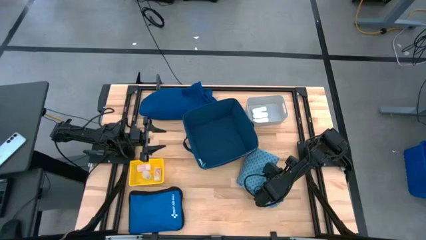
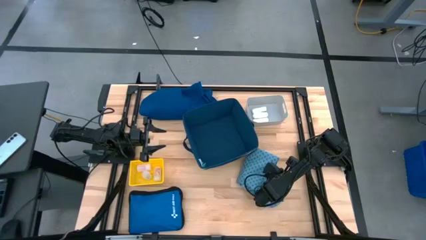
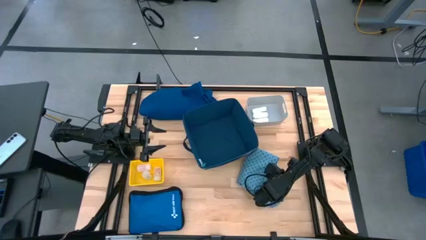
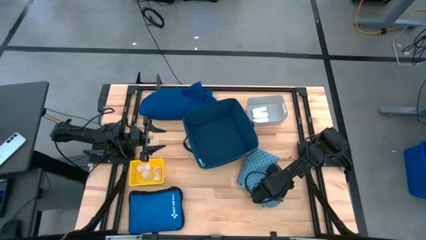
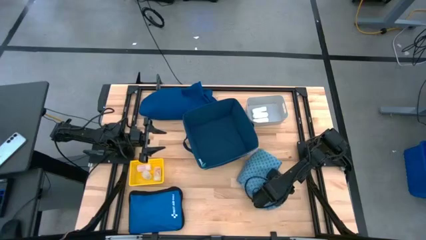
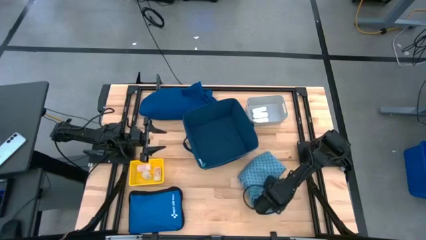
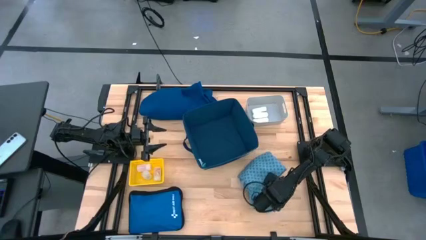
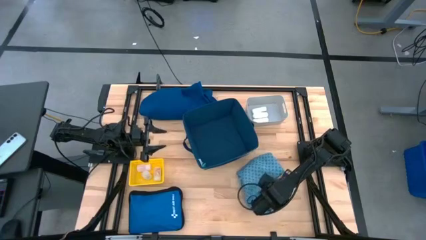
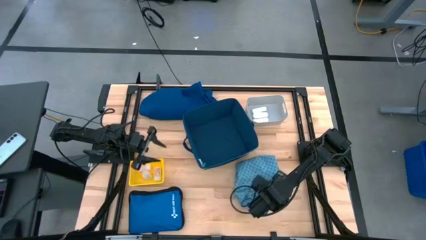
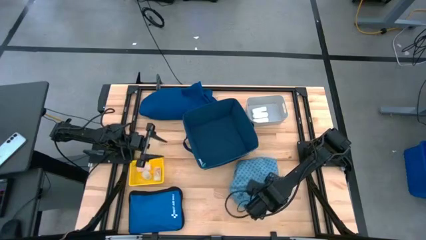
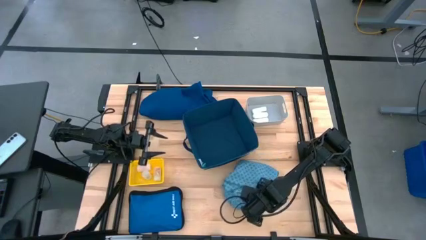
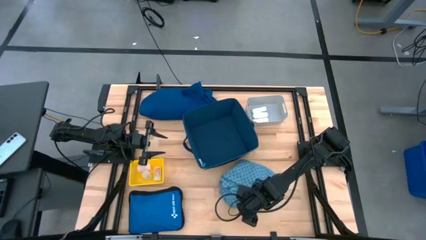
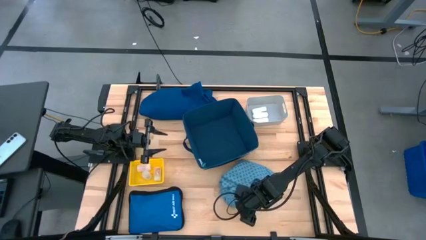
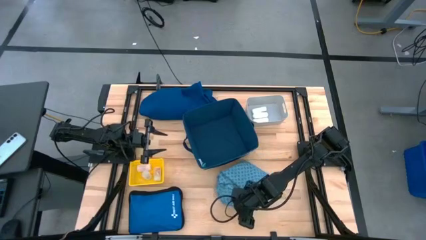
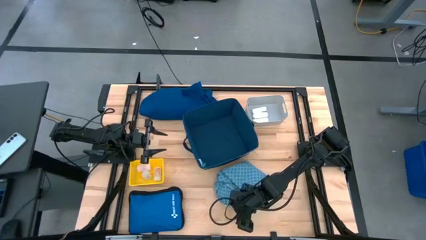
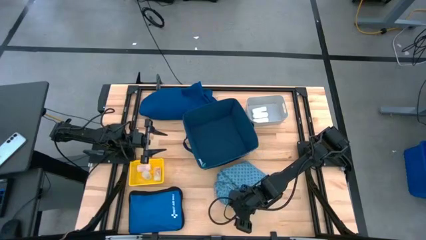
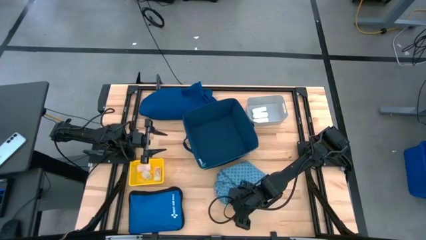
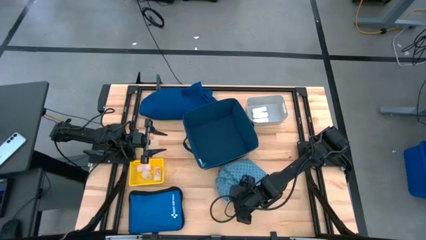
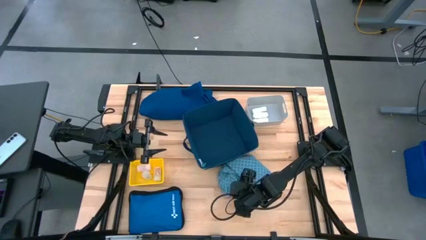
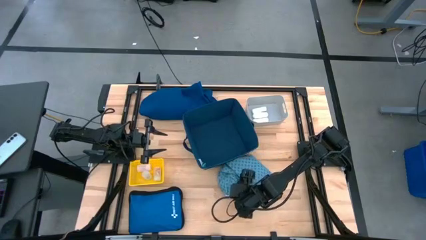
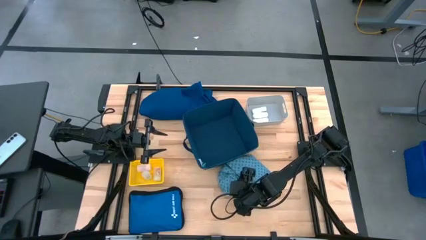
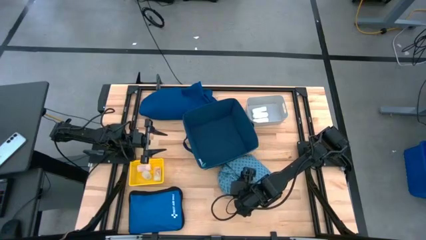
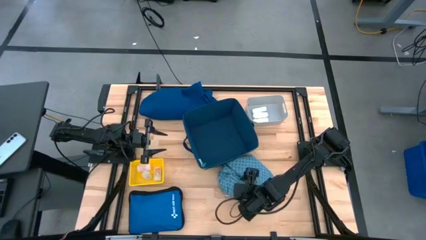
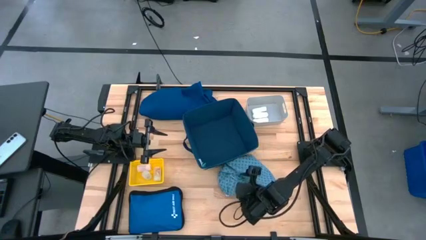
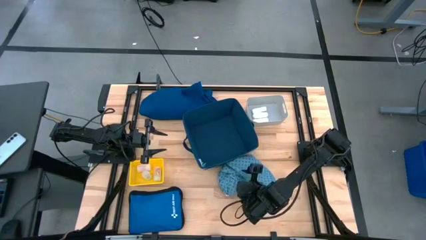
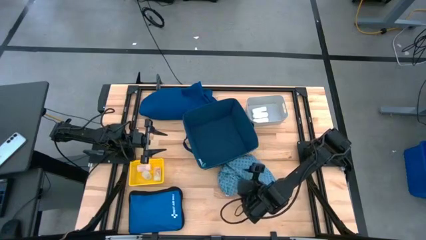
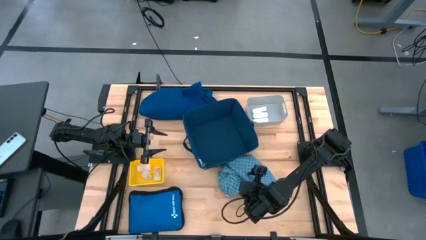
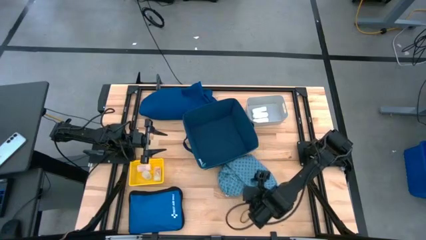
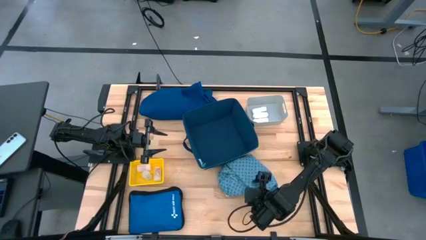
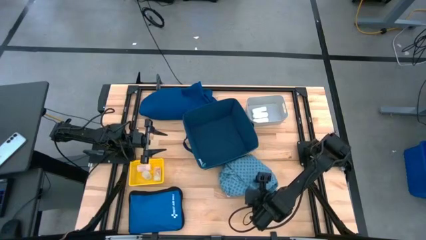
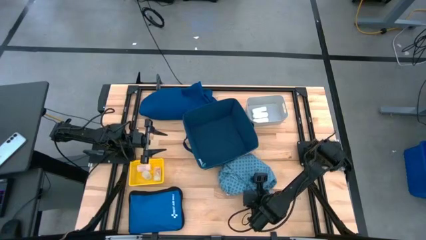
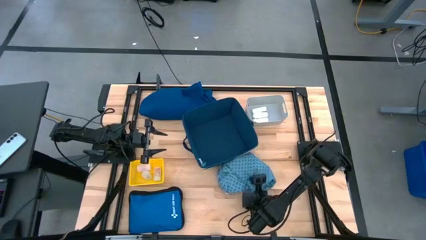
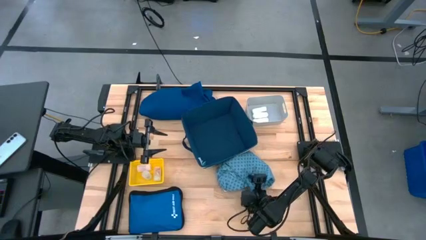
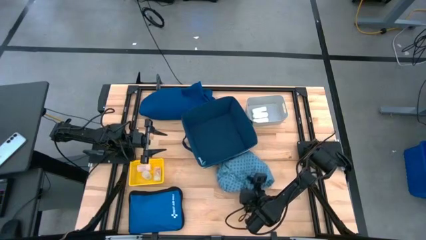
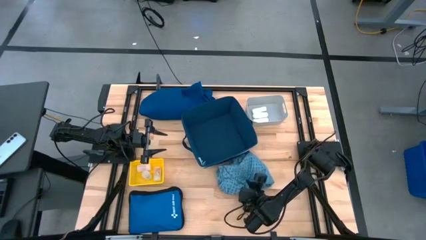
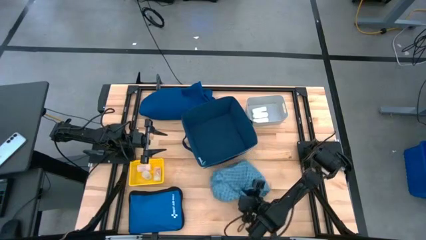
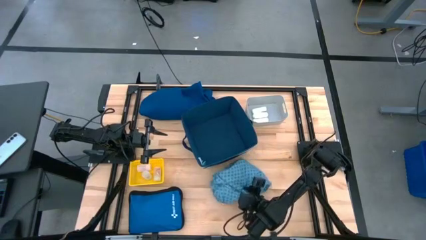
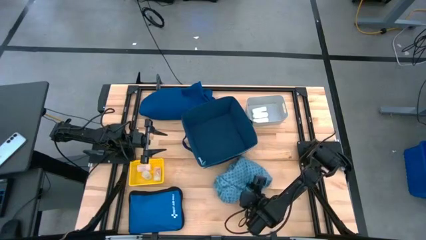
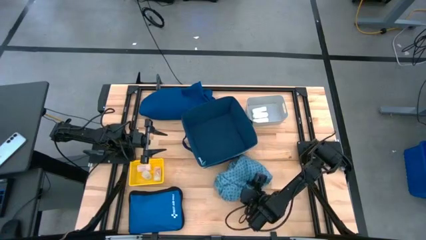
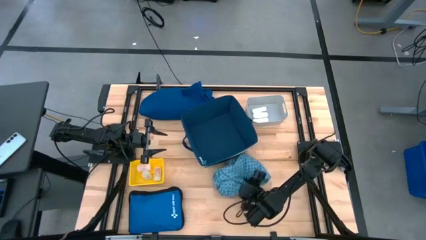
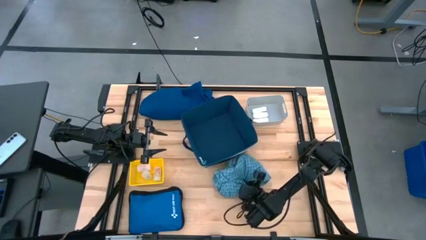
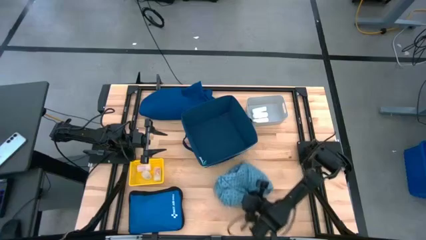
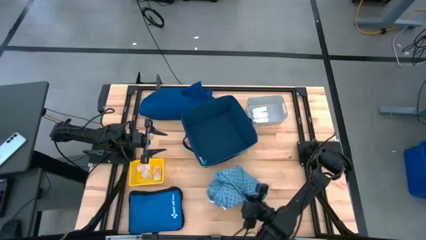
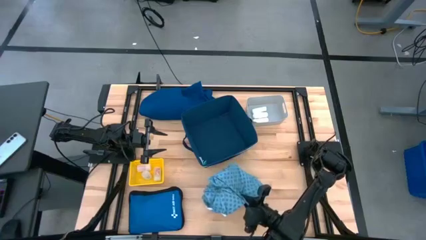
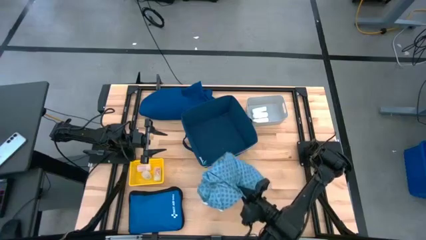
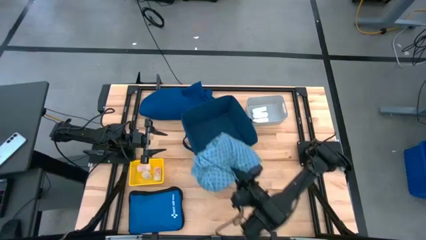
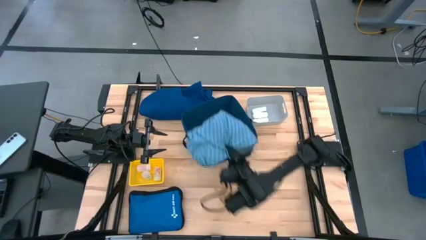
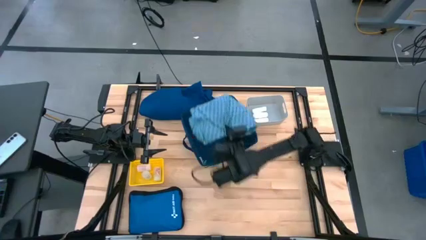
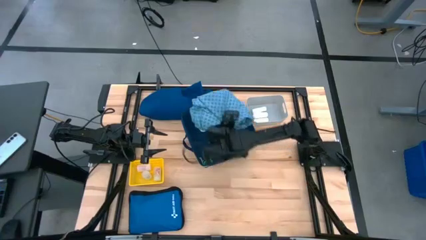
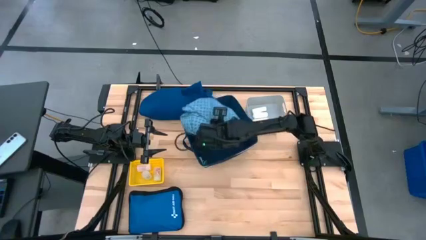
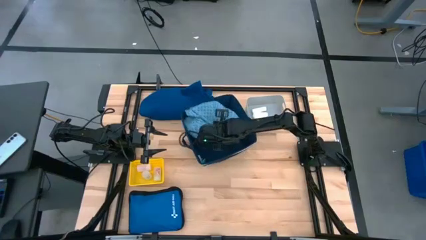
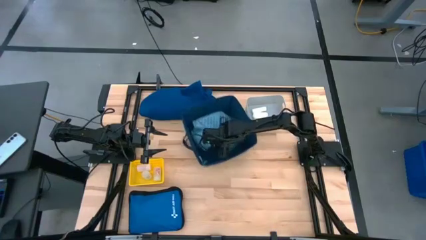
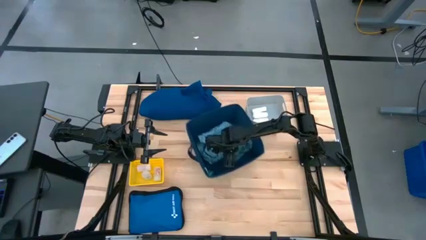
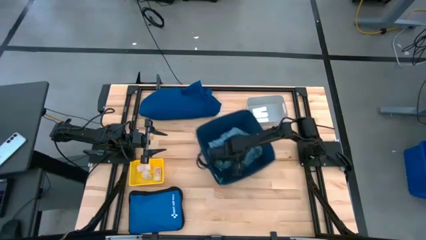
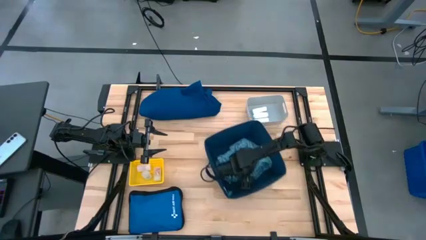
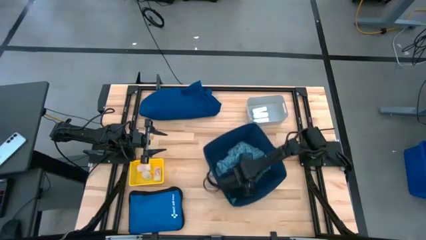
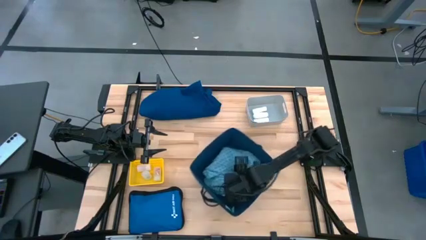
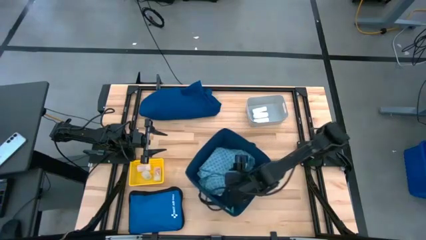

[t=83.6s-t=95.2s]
Task: Pick & place medical supplies in basket/bin
Put the light blue patient gown into the blue bin

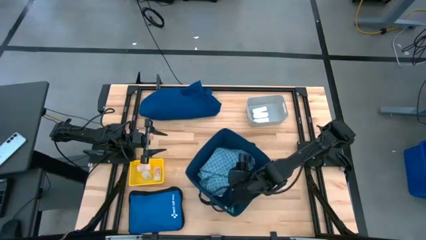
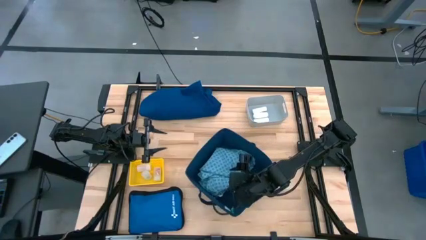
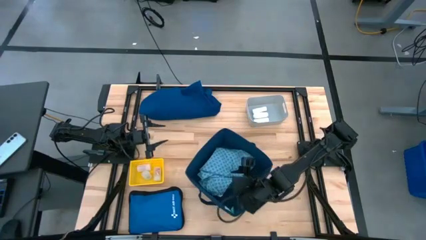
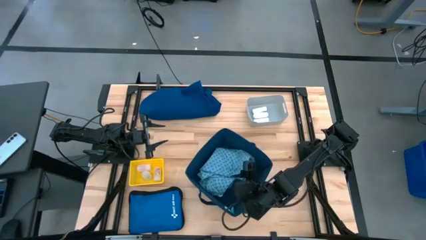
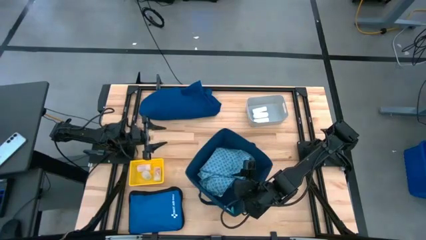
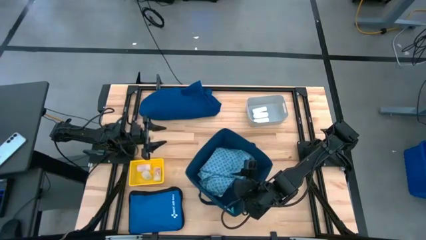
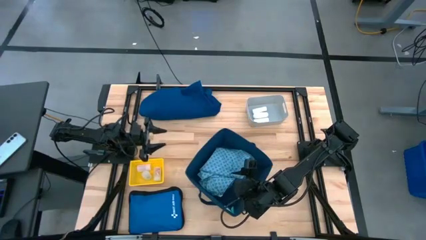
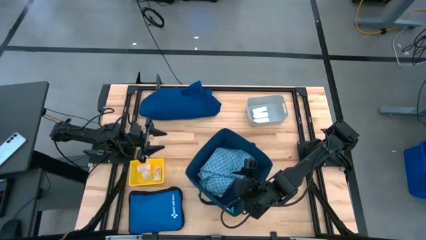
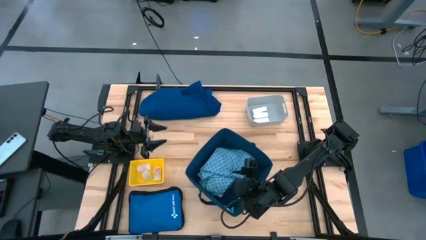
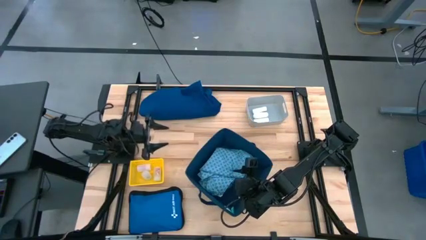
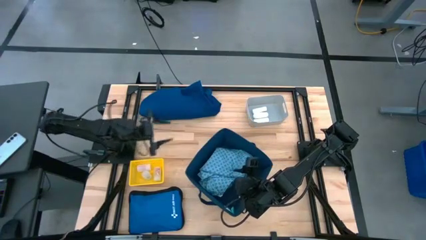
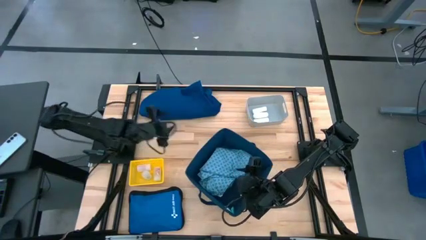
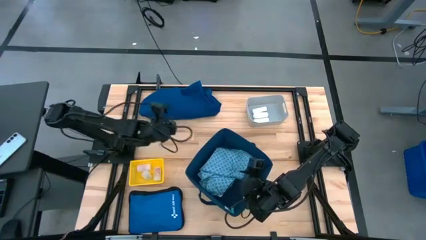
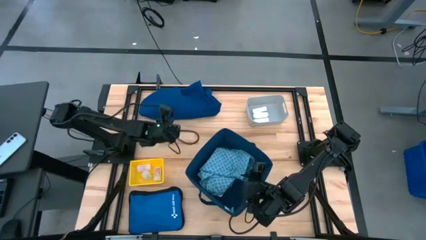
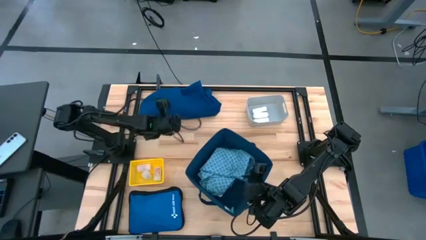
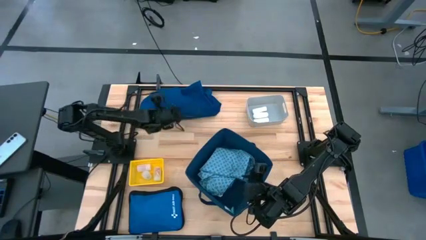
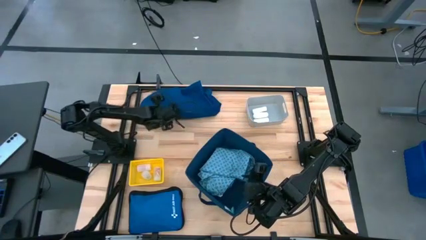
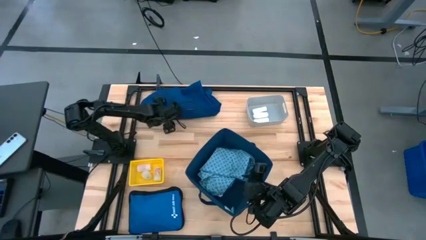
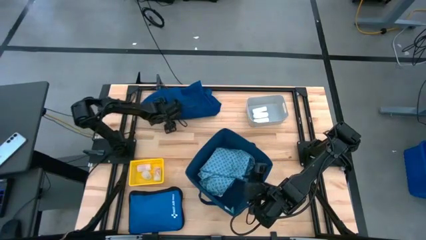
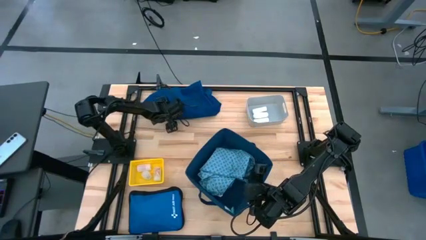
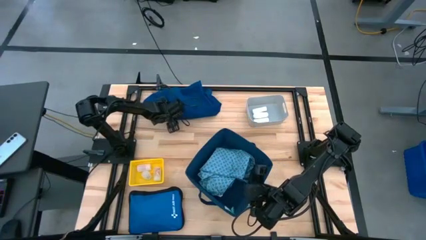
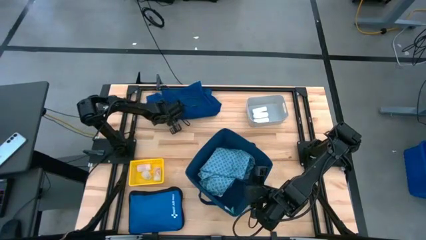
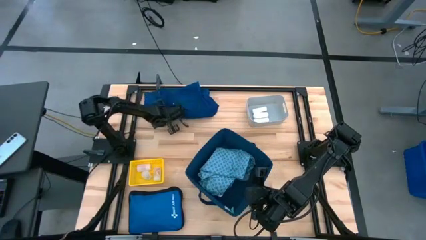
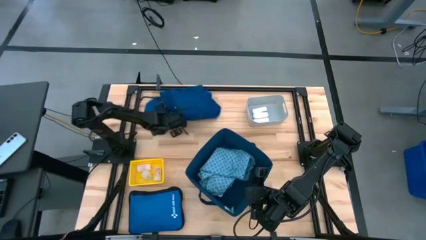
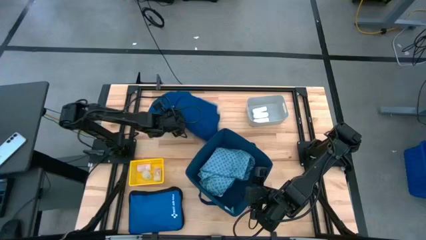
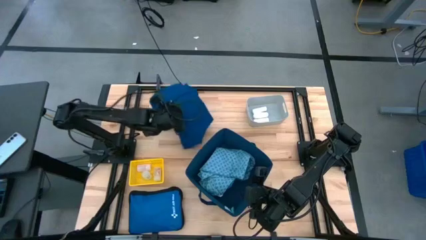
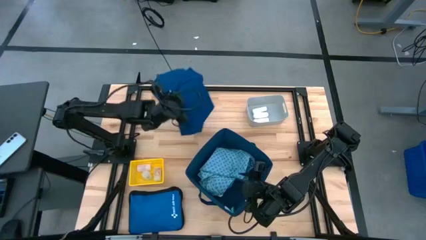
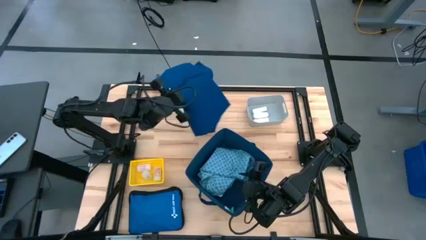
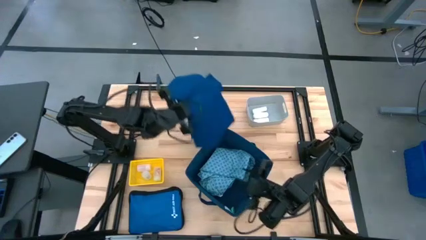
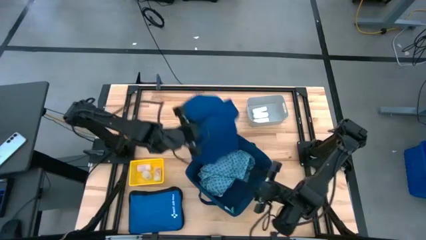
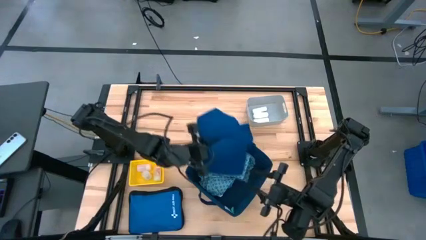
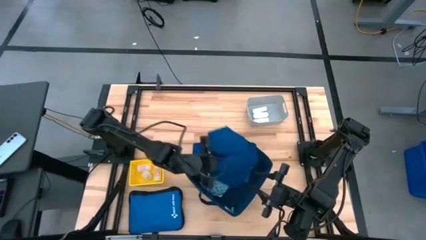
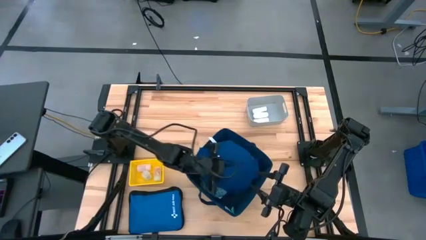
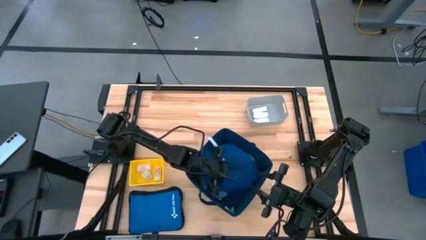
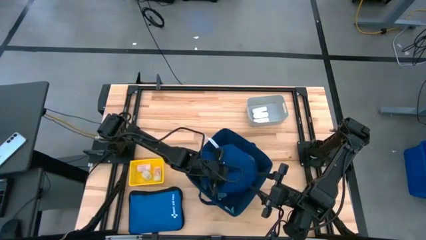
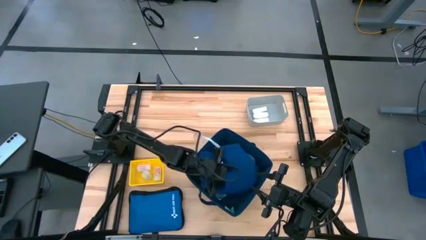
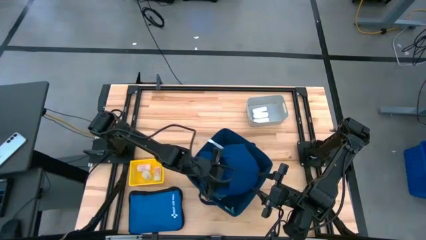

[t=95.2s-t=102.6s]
Put the blue patient gown into the blue bin
